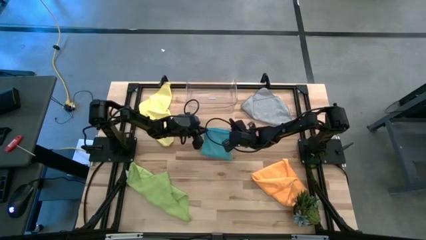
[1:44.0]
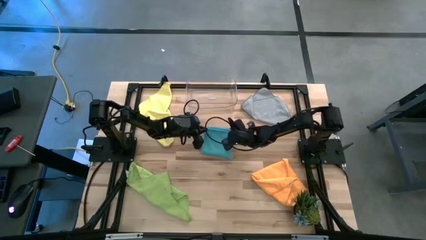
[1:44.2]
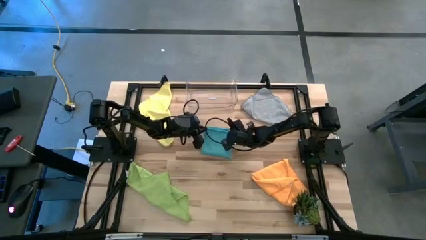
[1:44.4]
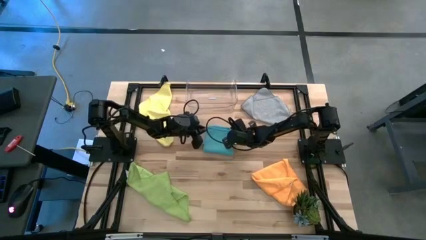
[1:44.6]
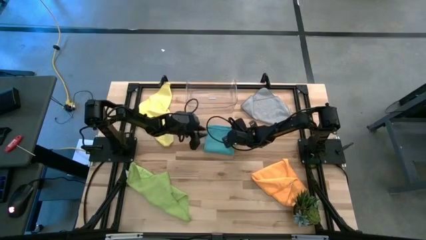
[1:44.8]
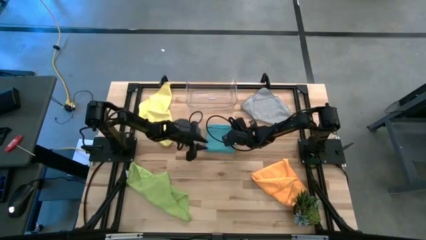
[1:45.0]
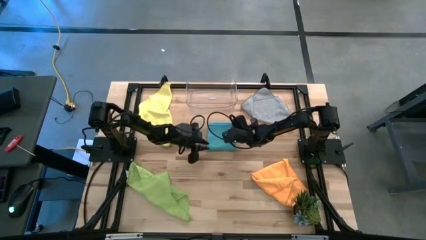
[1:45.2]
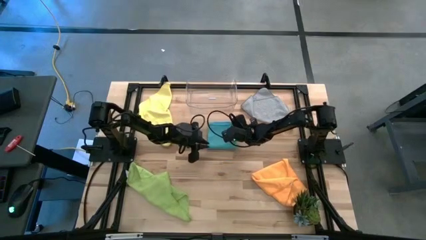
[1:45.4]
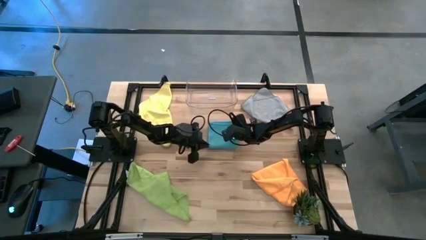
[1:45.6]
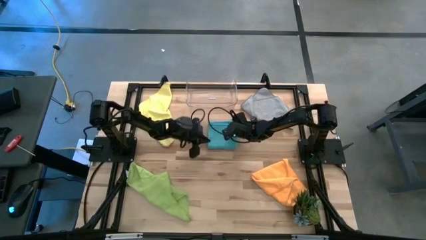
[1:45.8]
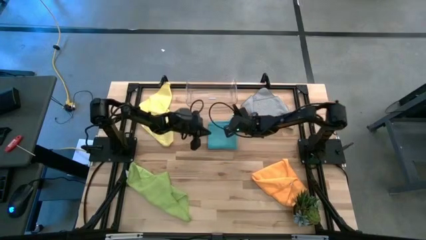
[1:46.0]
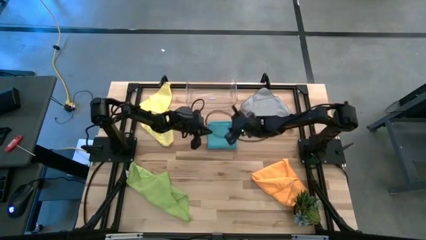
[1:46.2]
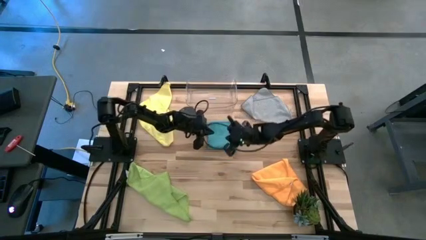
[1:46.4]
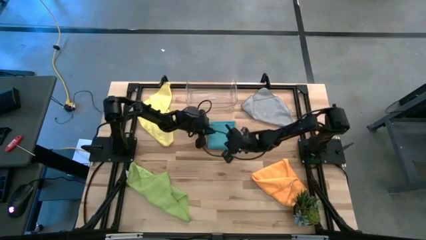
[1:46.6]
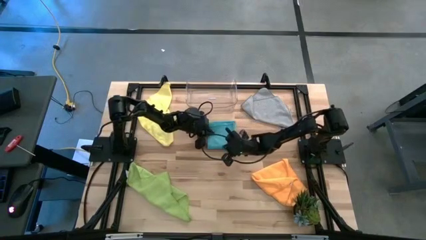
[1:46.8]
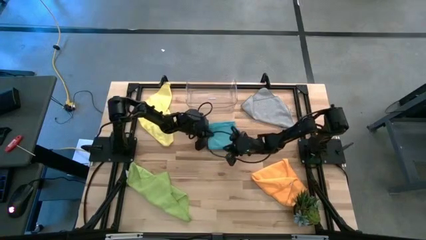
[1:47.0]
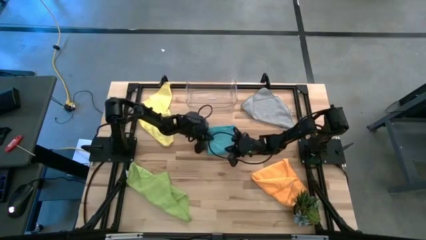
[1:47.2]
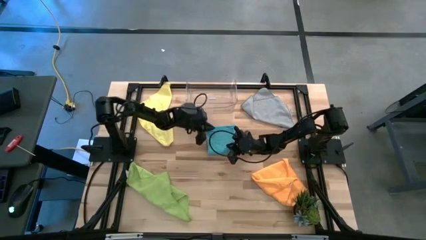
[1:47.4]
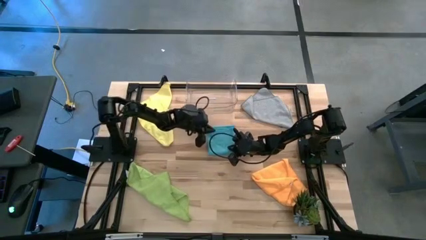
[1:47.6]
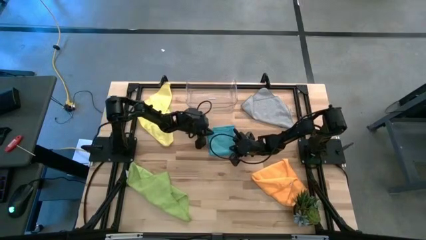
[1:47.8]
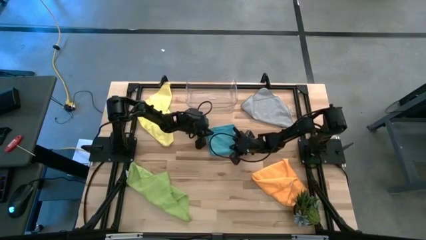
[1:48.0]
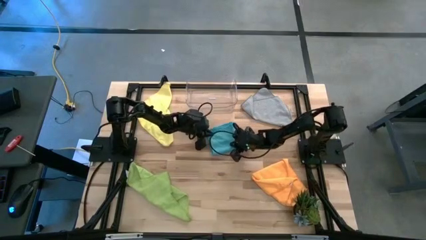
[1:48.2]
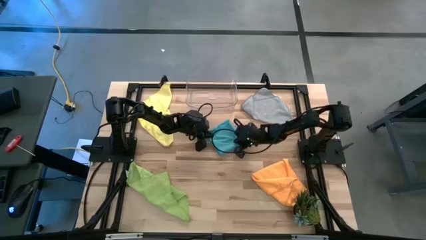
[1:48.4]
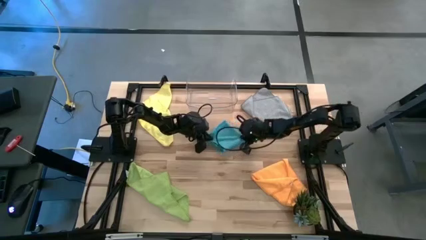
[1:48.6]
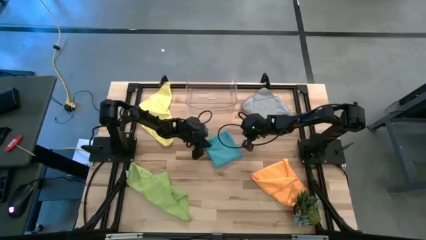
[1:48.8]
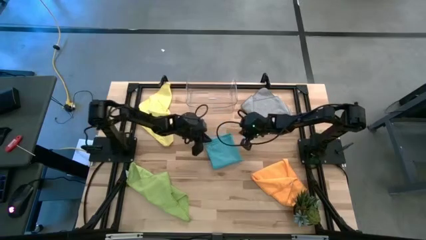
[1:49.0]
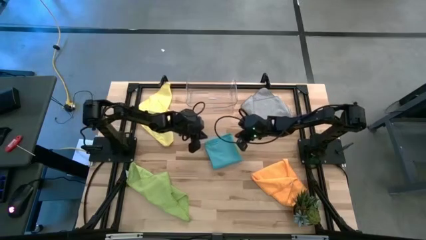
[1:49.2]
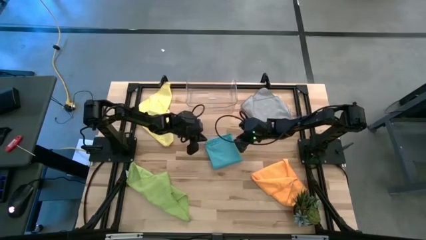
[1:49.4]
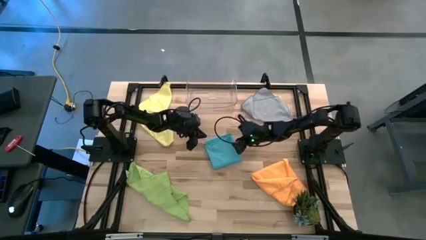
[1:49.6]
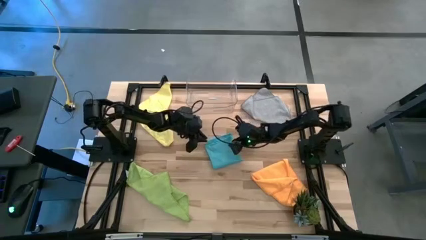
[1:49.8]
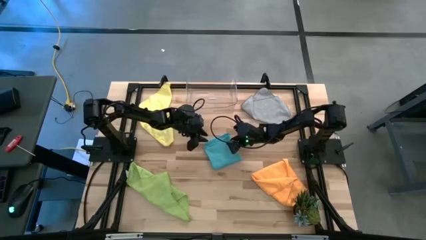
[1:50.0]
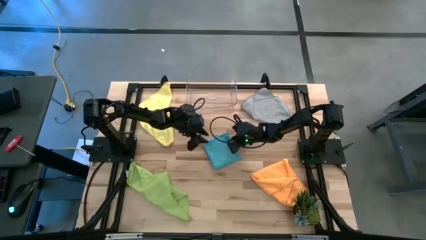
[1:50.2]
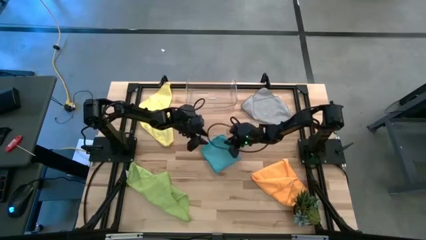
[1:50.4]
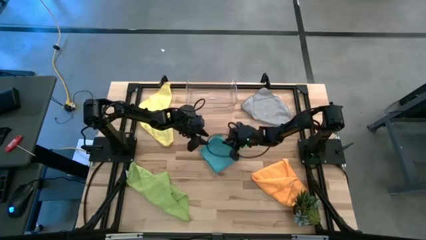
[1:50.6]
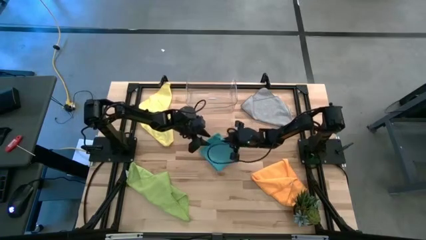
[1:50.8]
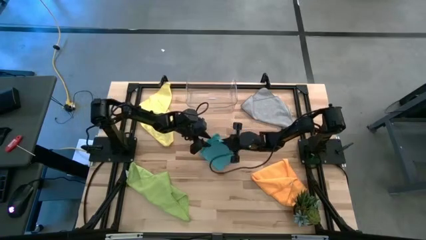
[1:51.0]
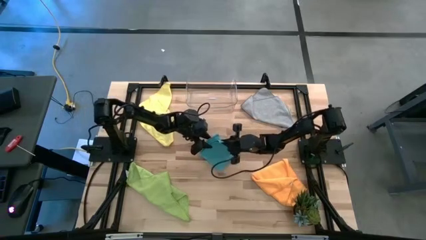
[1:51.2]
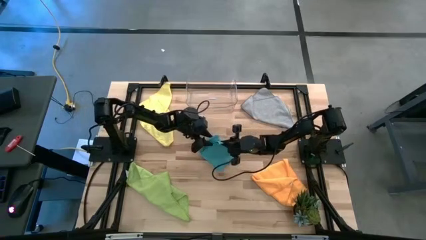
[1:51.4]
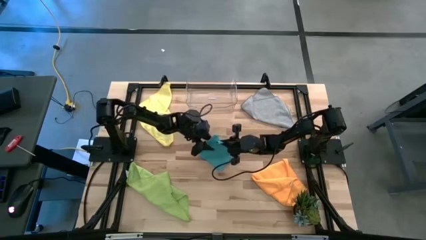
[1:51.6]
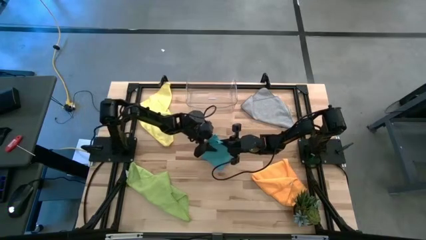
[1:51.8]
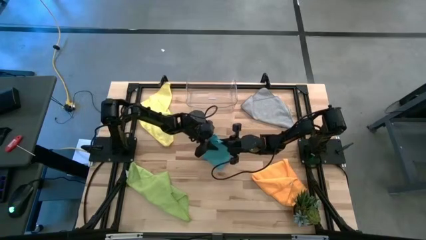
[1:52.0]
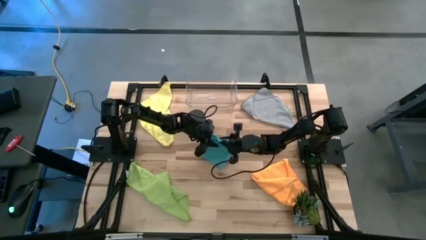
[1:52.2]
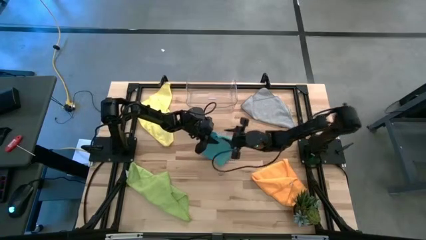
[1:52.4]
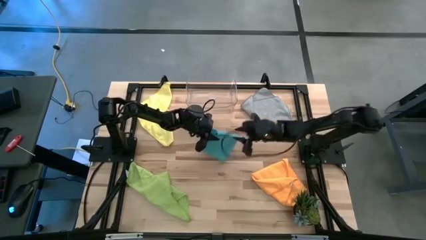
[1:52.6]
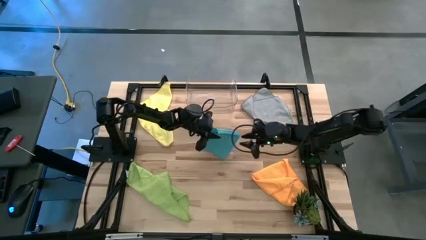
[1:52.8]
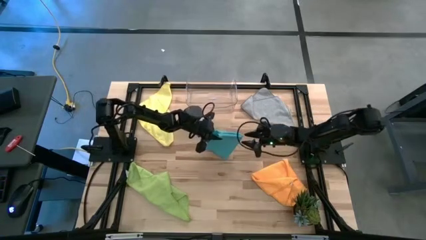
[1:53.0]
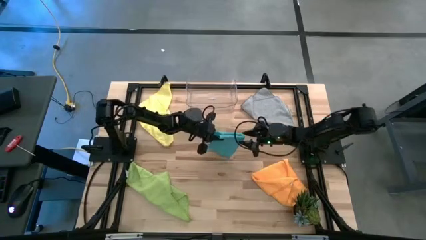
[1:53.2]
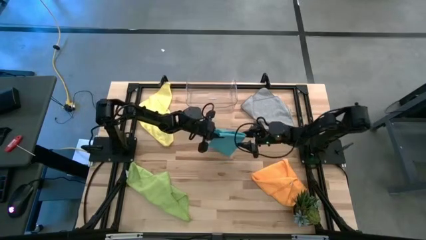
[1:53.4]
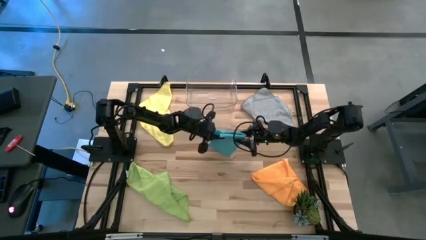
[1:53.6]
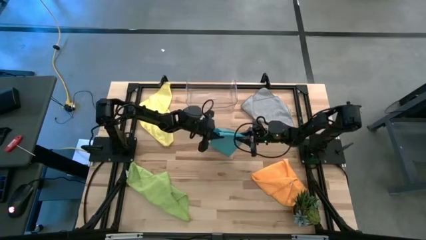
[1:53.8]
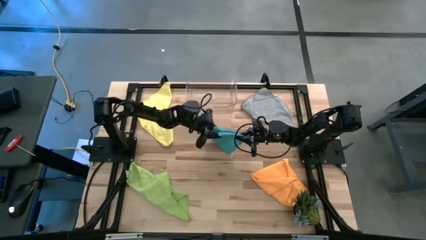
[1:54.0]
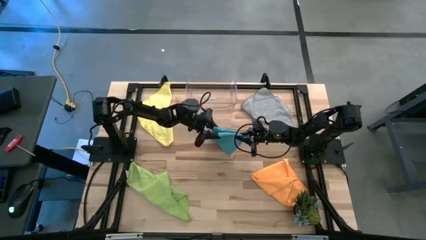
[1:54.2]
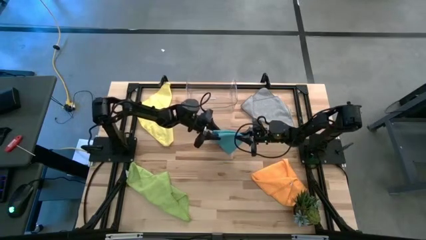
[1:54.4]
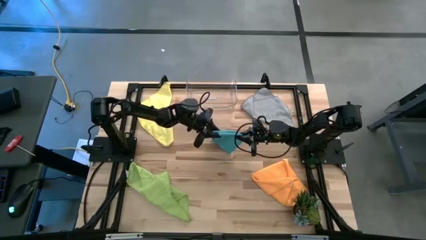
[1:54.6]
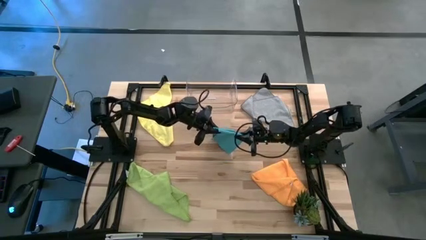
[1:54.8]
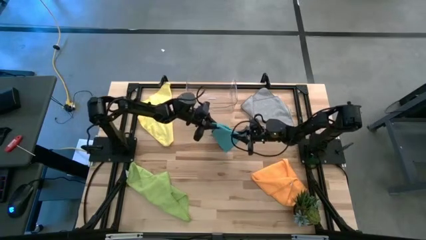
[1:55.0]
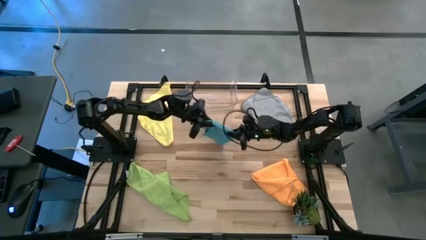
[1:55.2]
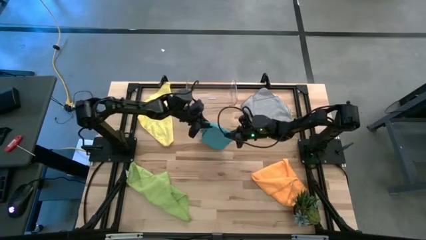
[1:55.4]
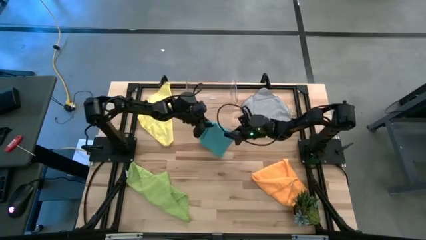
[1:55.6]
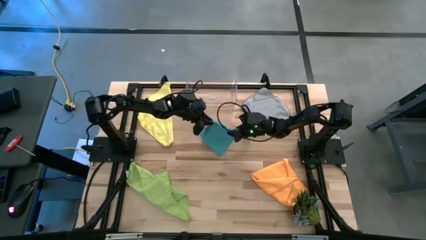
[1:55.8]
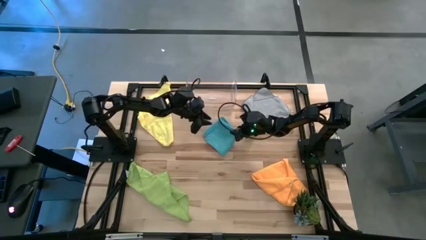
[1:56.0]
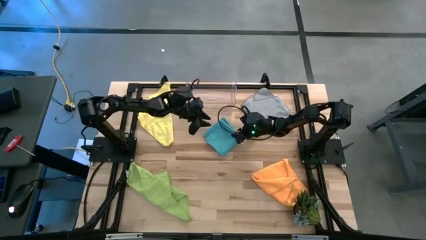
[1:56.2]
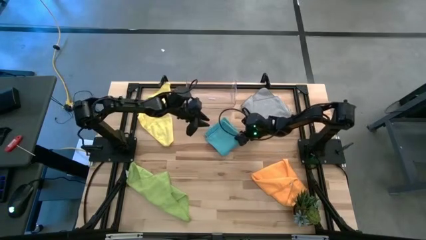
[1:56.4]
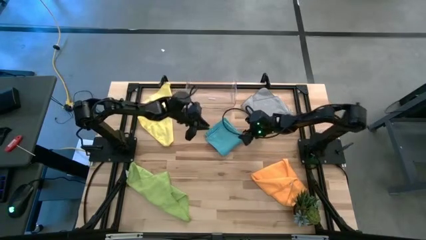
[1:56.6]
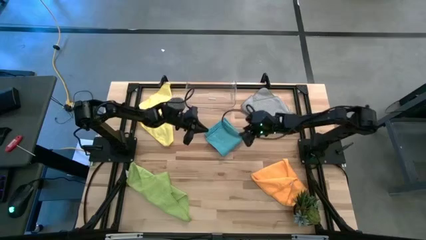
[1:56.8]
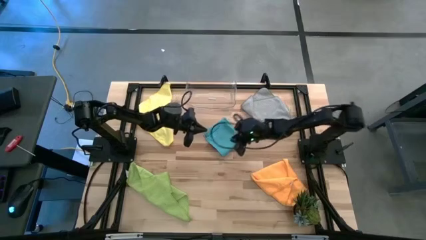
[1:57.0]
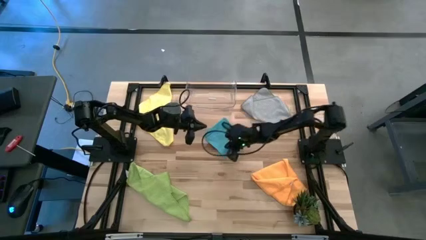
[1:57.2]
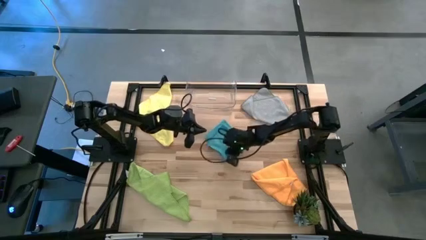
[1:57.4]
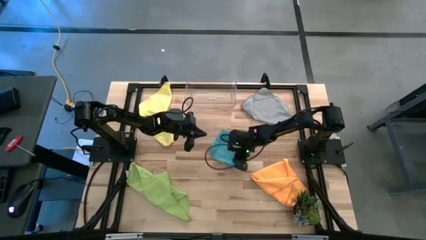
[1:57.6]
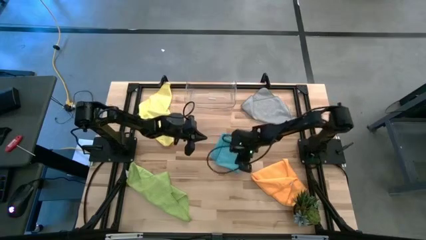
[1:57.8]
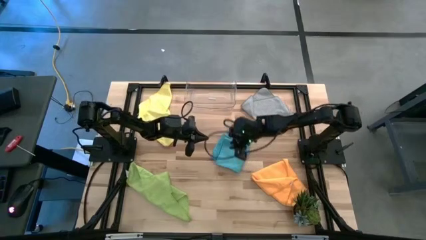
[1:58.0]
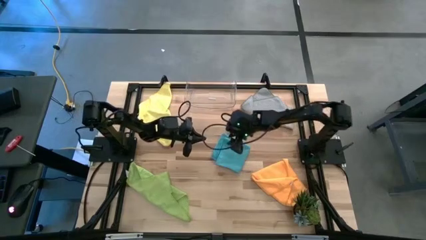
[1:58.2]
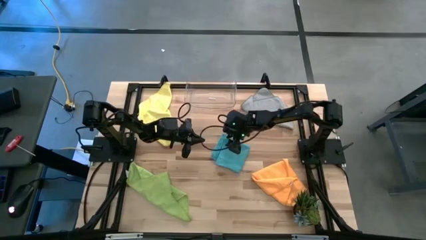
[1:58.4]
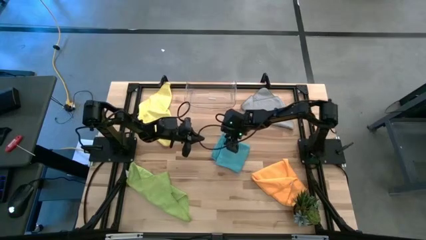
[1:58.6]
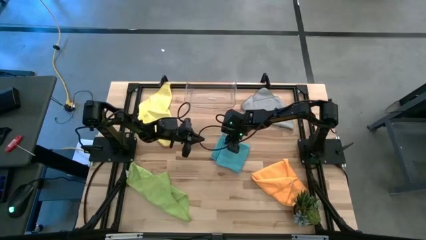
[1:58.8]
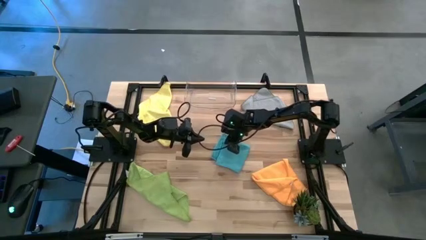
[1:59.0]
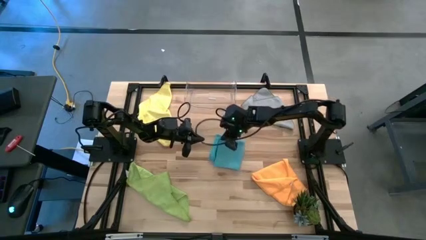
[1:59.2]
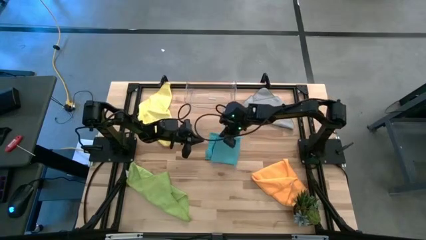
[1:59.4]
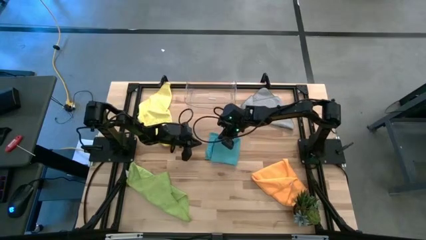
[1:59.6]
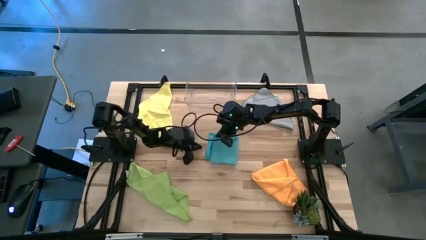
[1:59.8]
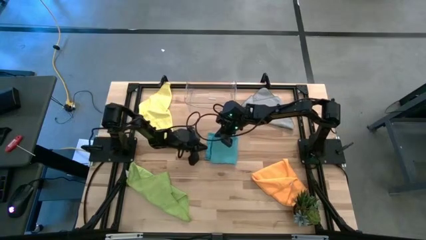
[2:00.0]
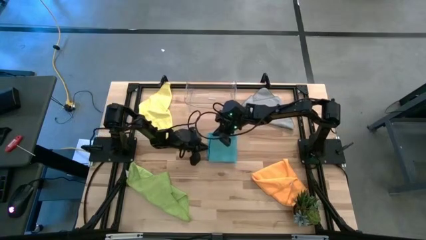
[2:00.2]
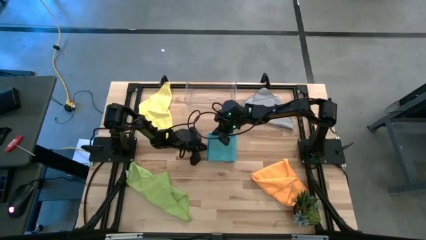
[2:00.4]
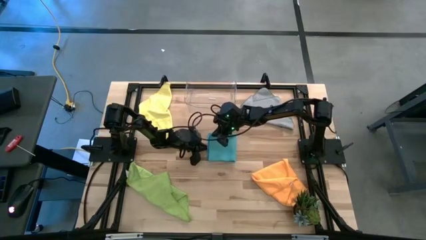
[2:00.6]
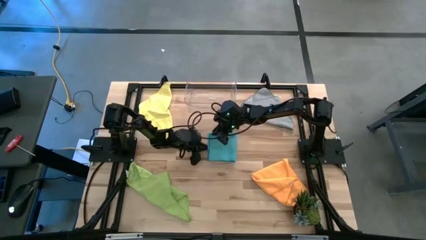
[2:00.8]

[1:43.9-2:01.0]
Task: Fold microfiber towels
Fold the blue towel
